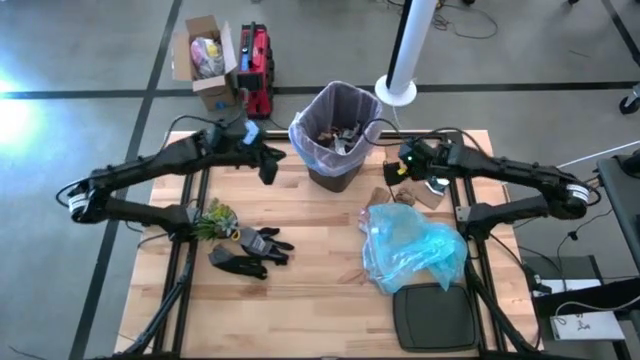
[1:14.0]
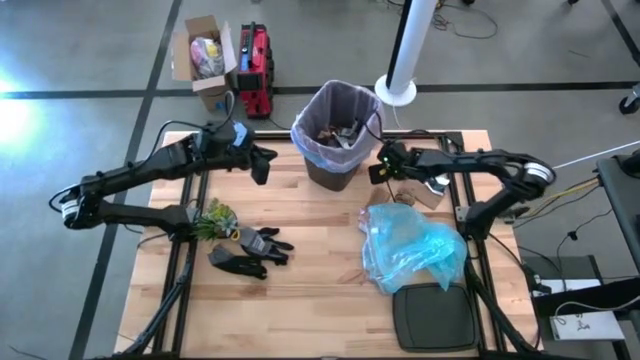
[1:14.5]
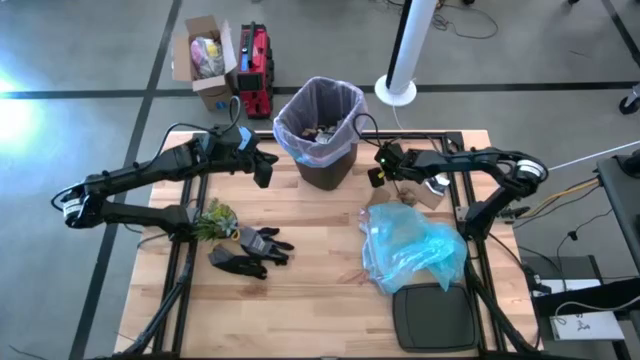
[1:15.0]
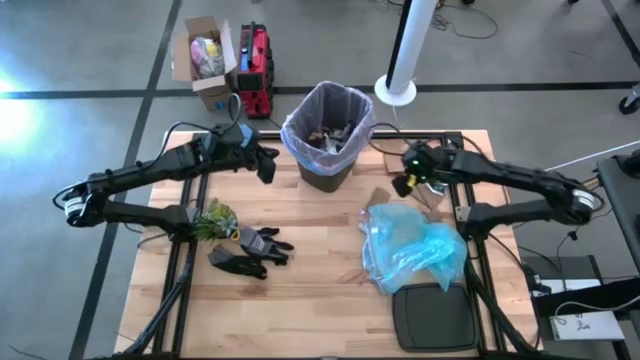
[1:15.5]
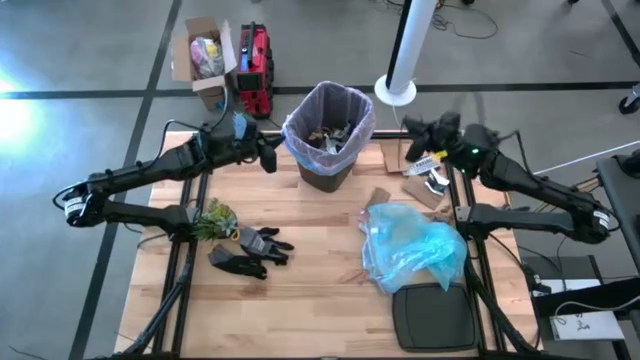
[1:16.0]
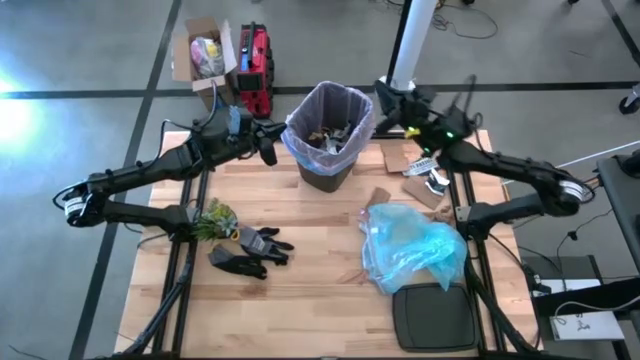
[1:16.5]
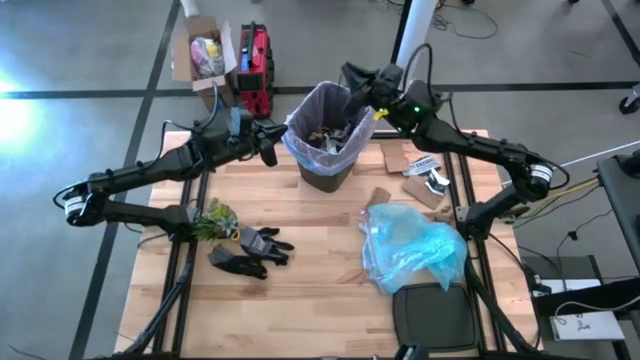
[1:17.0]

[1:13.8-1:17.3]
Task: place trash/remove bag and relplace
Put the black zip tie into the trash bin

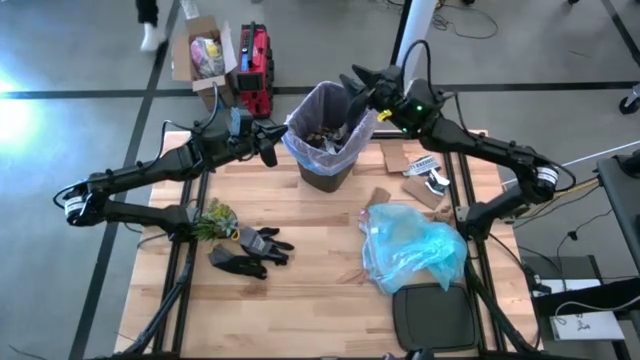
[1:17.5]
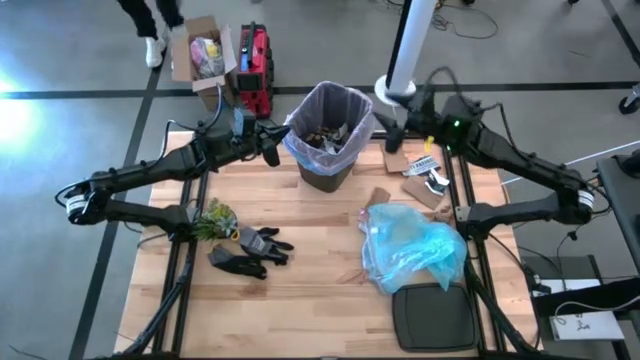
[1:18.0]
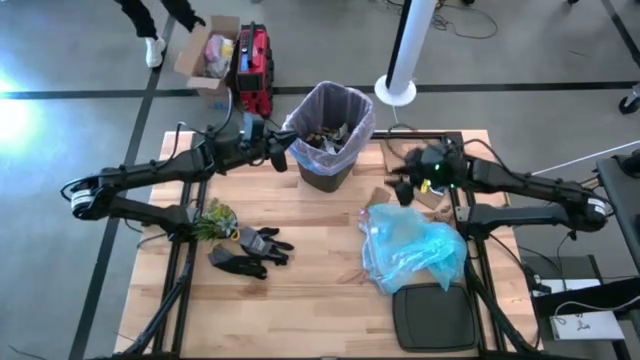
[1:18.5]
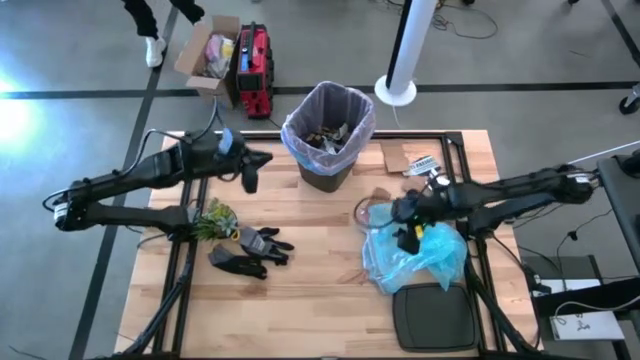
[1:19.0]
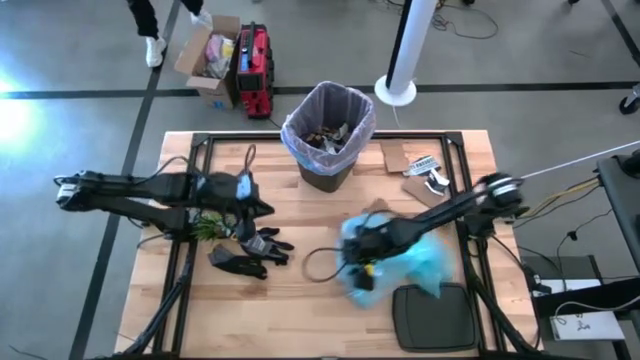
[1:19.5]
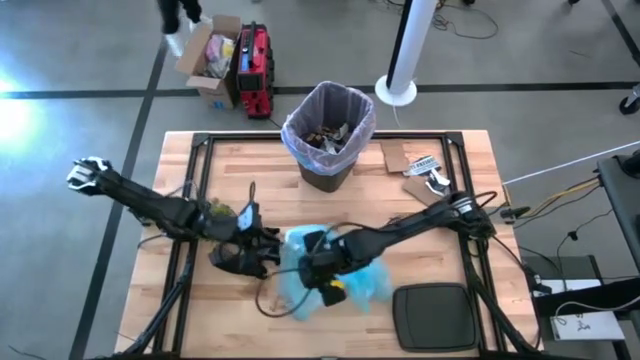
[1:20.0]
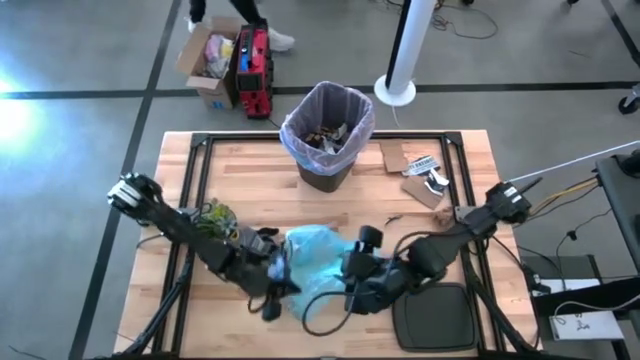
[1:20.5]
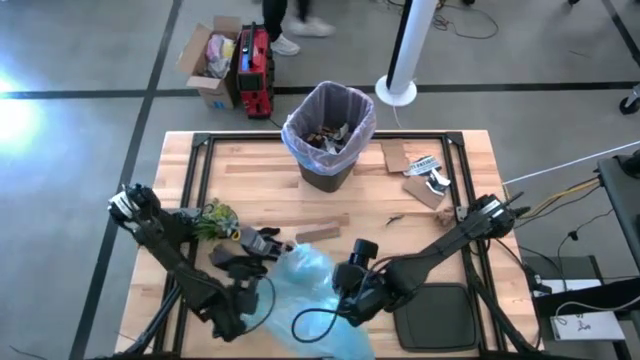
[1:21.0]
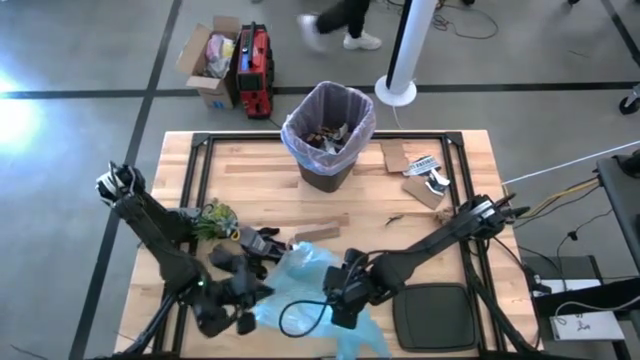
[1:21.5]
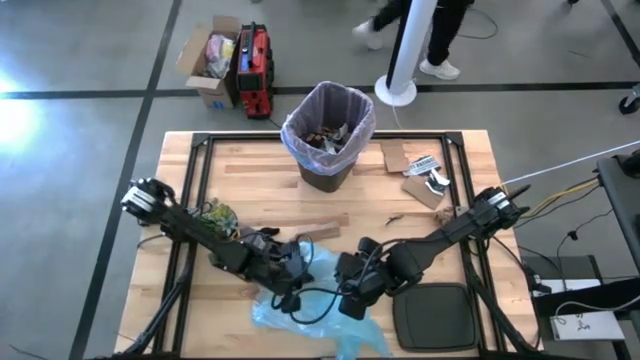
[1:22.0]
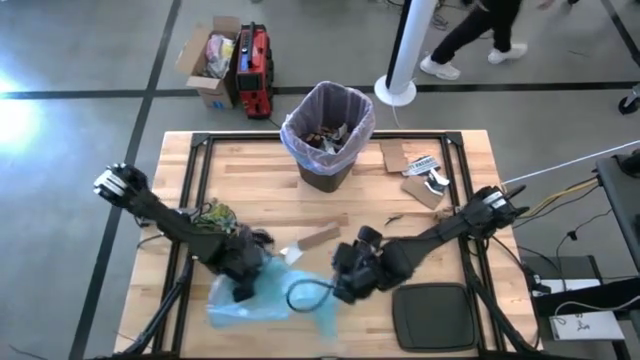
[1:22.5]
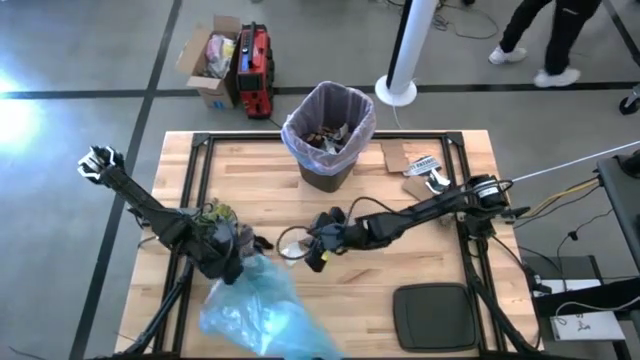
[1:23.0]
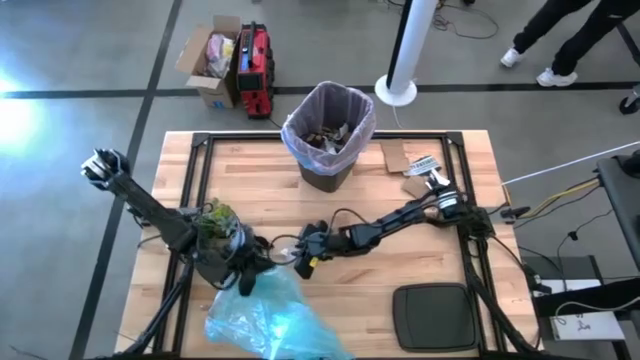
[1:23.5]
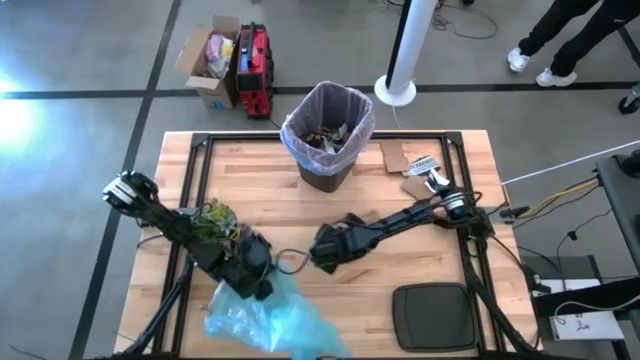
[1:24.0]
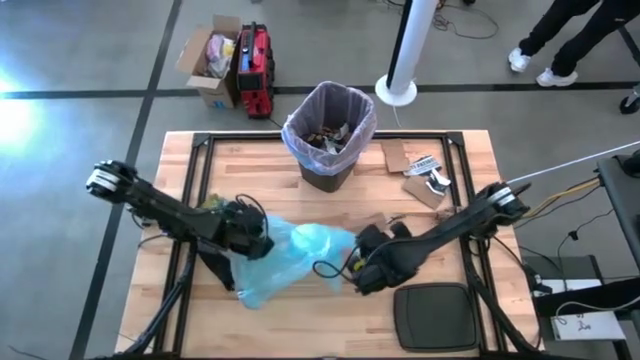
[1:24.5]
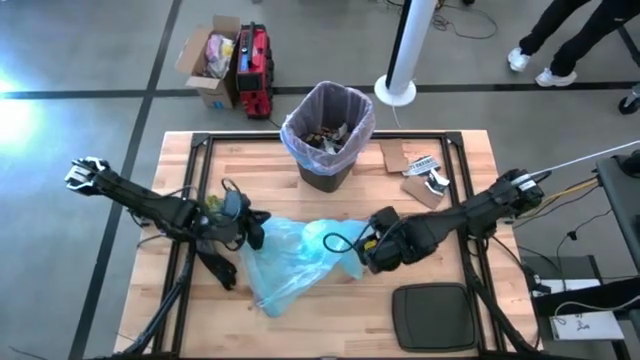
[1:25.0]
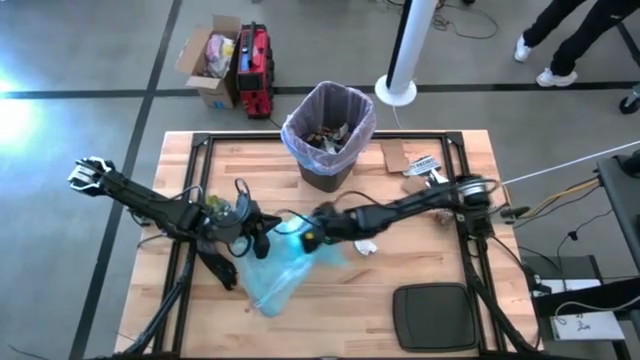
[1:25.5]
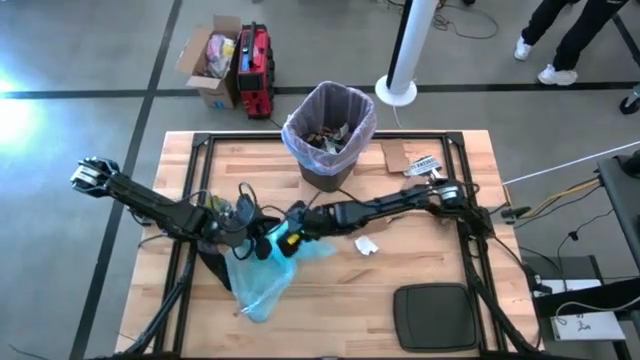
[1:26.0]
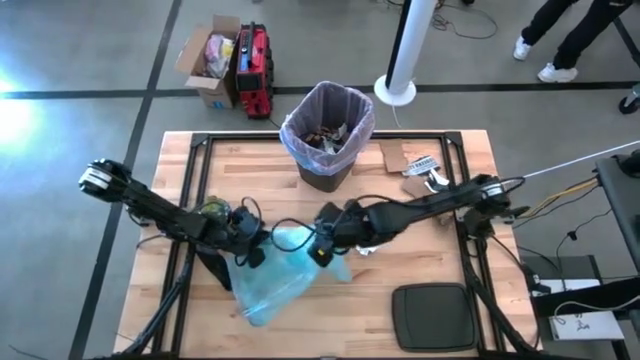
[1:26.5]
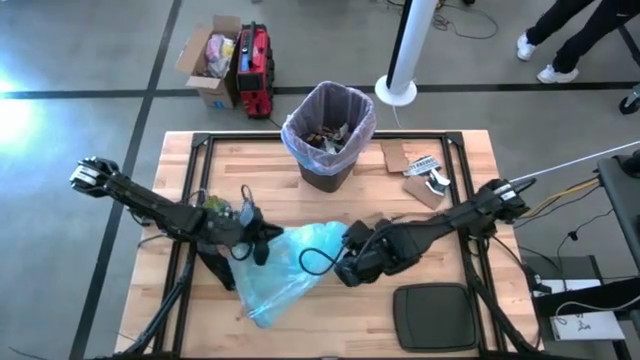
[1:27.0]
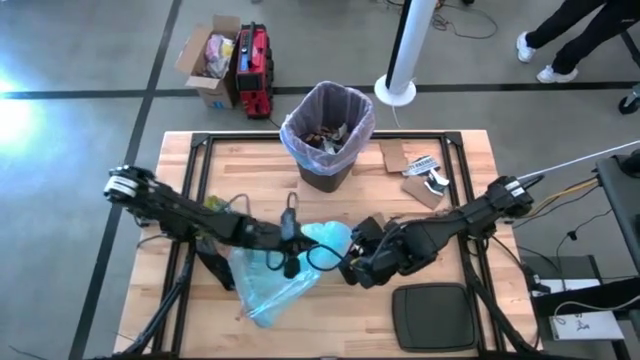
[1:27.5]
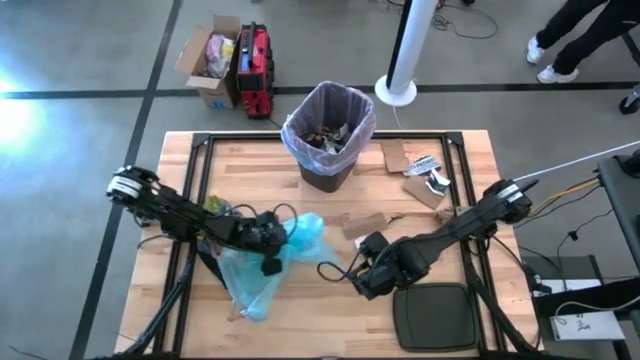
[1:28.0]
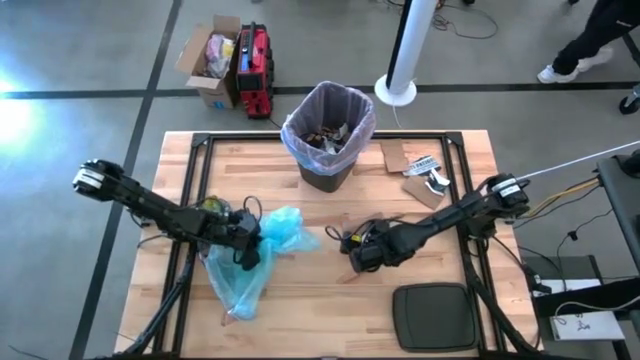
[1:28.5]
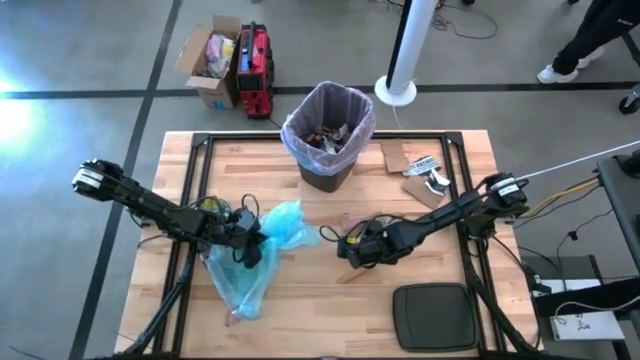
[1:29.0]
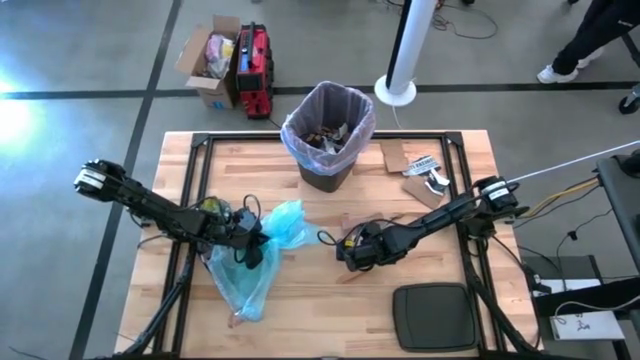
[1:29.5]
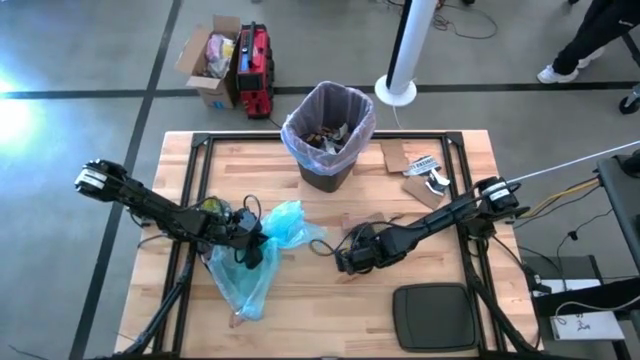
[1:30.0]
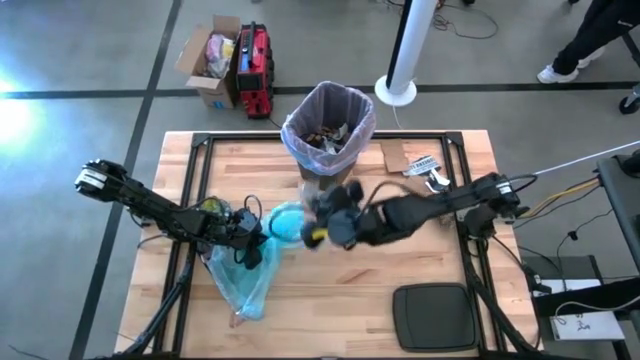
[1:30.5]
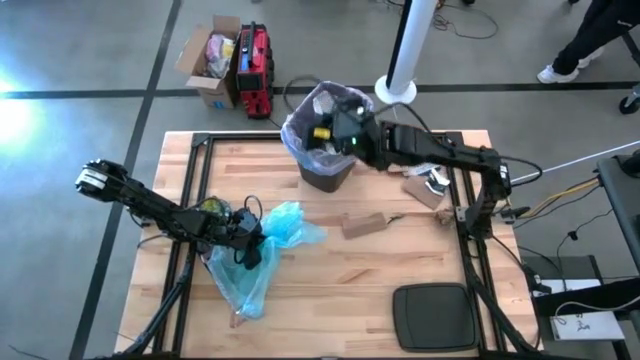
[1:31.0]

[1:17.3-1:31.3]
Put the white paper into the trash bin

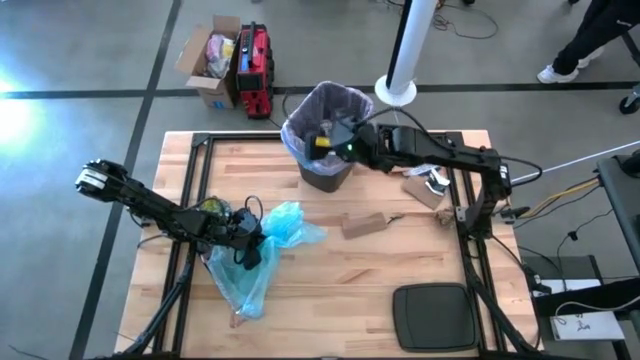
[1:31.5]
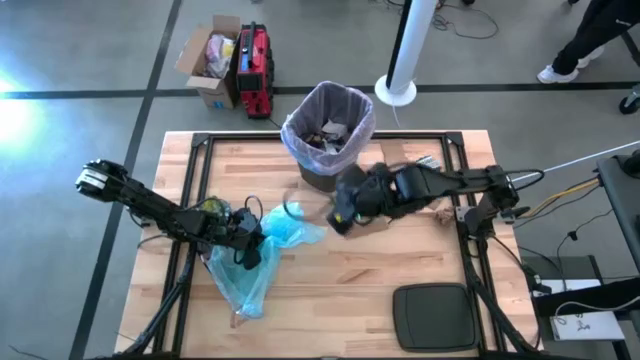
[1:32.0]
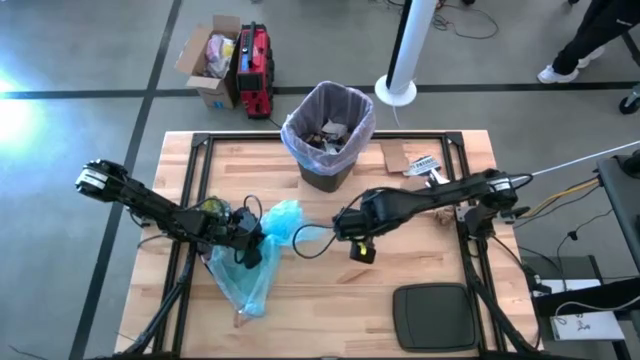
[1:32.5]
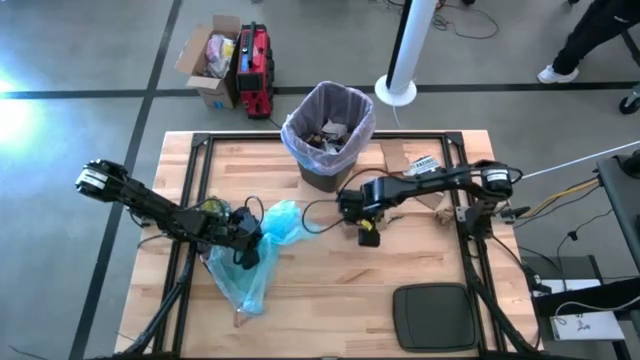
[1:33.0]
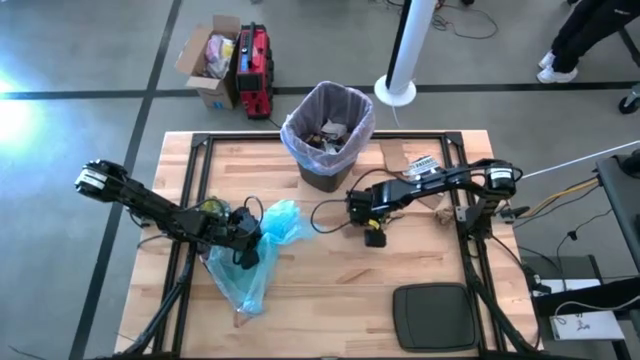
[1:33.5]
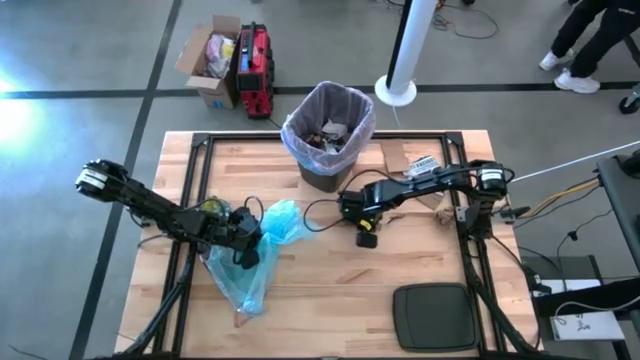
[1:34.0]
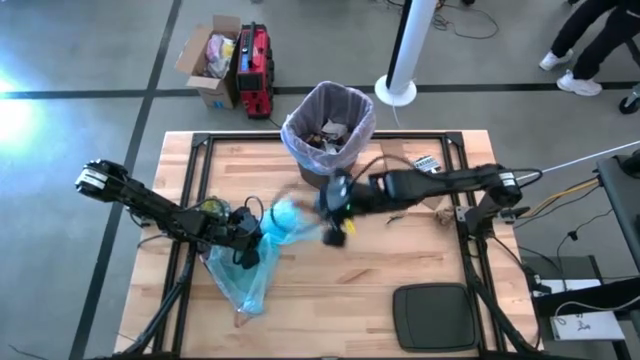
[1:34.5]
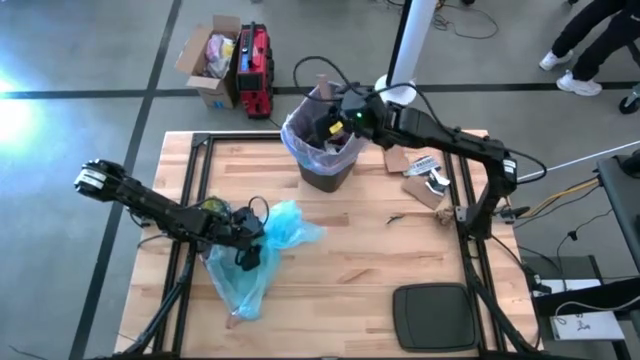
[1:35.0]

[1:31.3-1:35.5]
Put the brown cardboard into the trash bin
